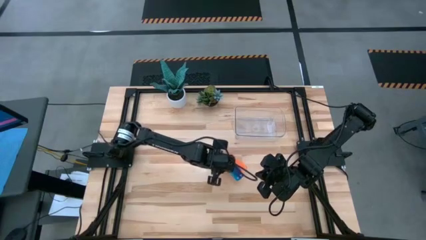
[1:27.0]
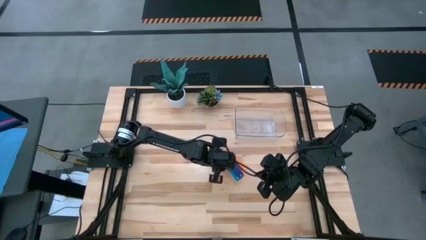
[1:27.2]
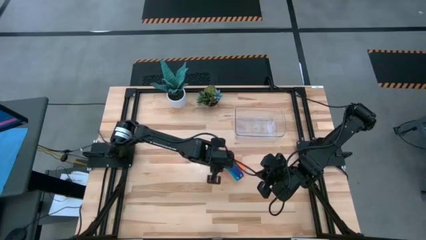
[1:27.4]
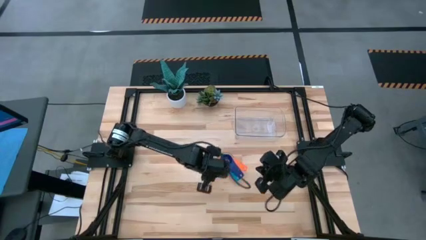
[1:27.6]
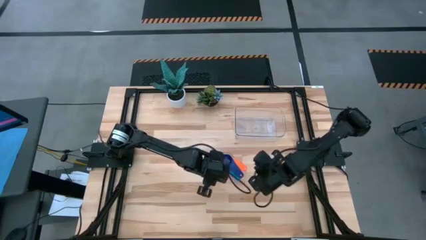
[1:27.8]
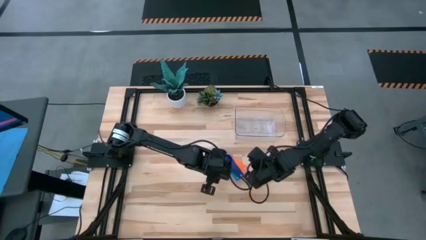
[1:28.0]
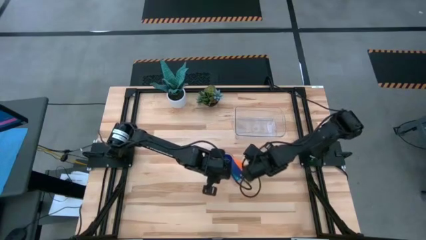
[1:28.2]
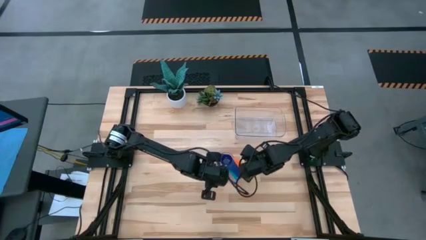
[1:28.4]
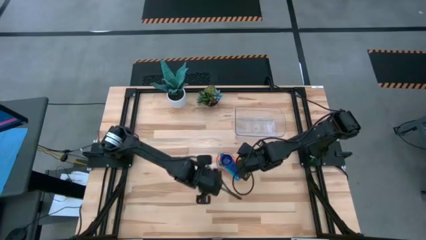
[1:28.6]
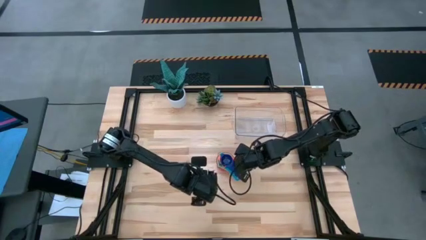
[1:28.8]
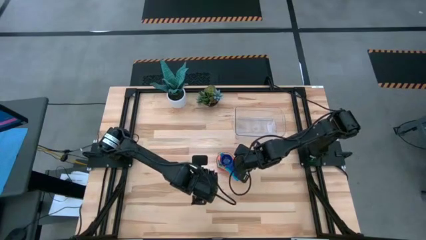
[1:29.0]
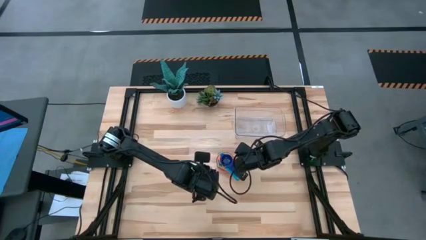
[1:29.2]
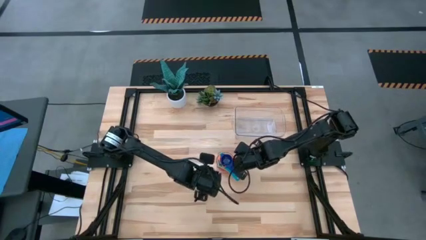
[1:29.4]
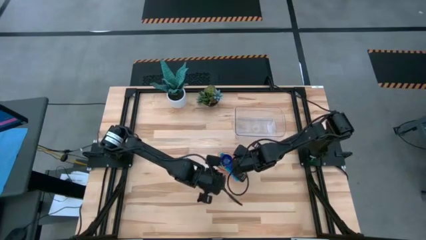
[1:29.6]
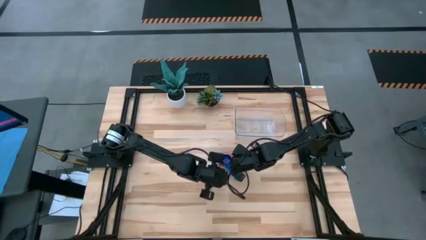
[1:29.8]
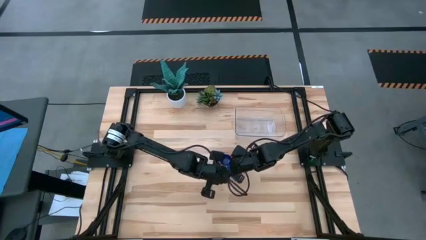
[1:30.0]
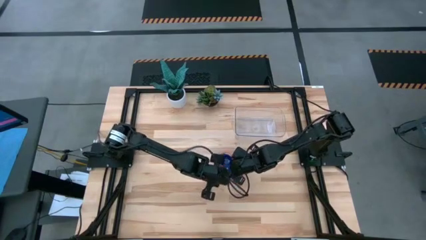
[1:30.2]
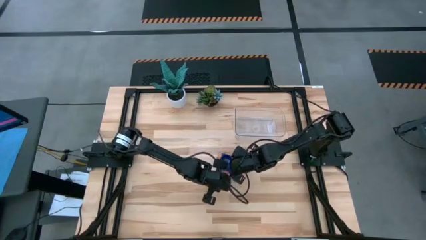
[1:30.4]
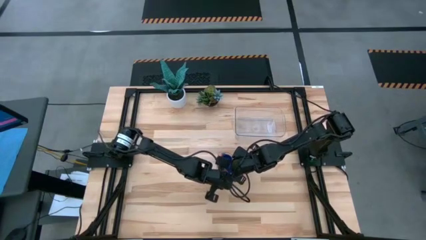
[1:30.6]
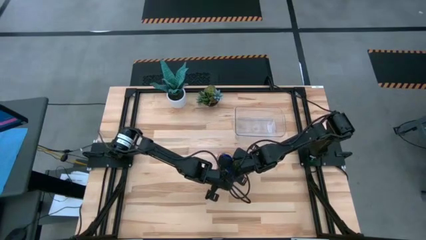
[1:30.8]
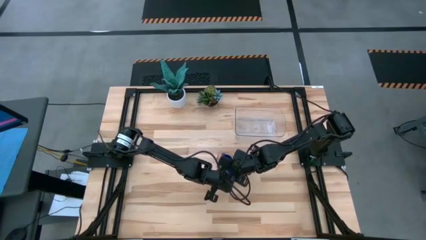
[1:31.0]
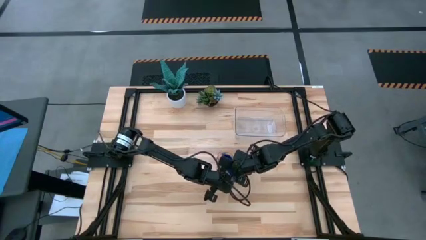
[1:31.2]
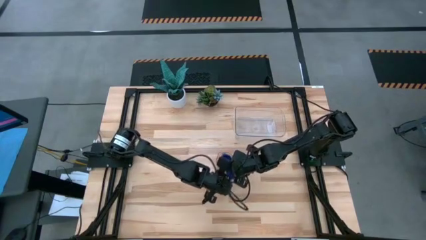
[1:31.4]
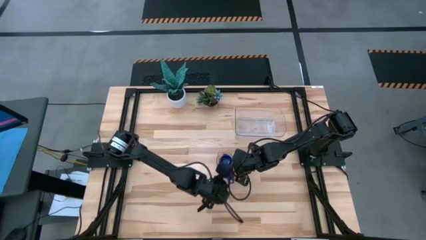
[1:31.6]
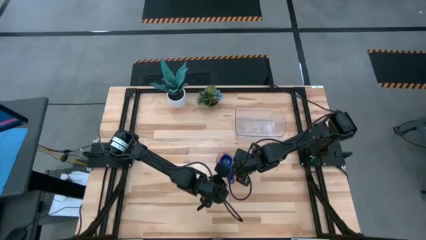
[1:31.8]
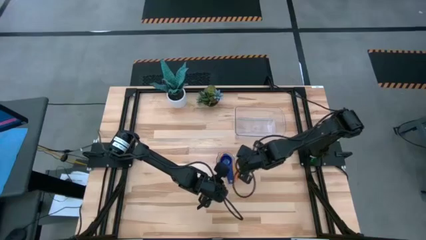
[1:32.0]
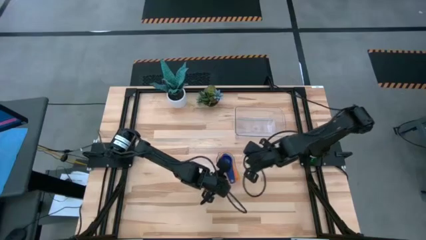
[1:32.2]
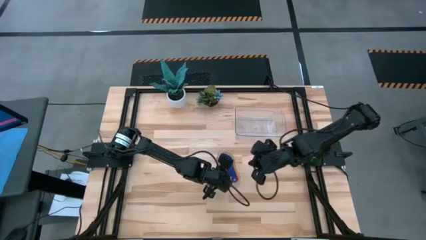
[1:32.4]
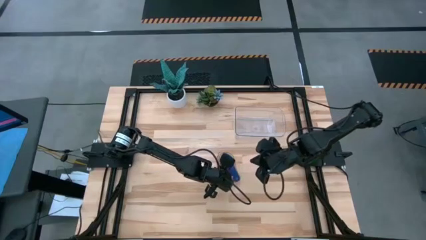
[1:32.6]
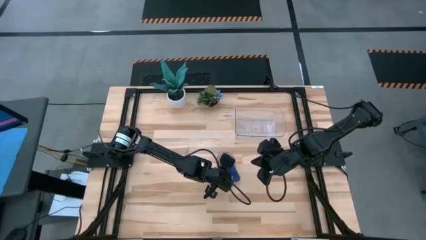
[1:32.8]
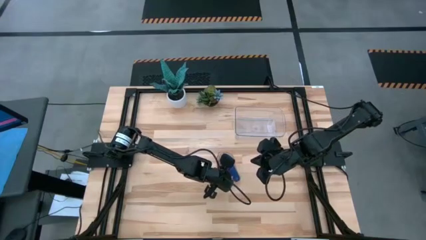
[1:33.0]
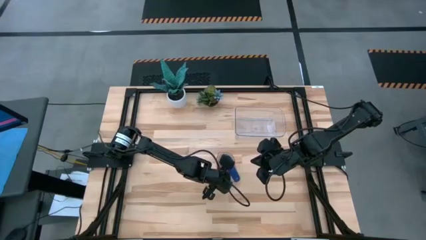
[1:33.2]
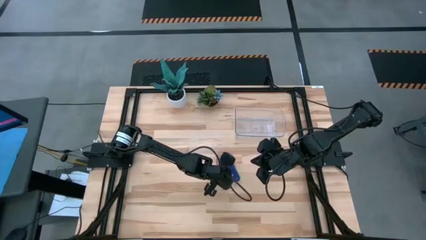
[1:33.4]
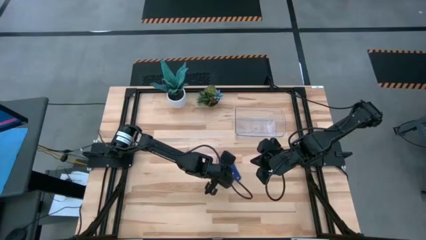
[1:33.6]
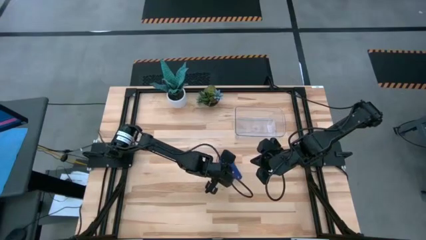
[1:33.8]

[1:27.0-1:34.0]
Task: Nest measuring cups in basket
Adjust the stacked measuring cups

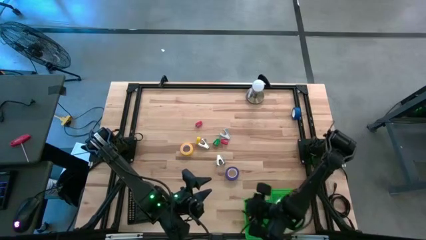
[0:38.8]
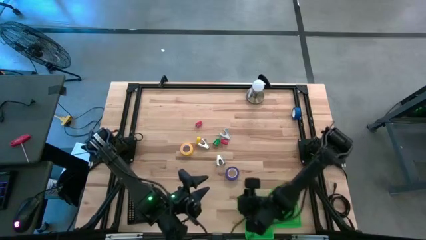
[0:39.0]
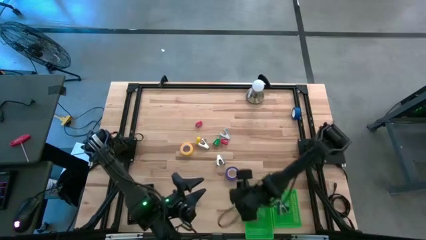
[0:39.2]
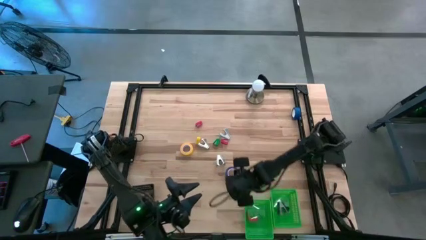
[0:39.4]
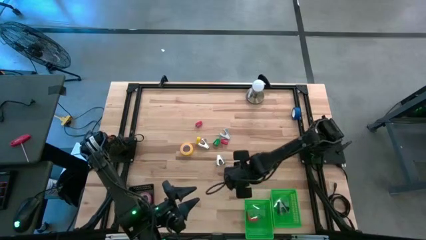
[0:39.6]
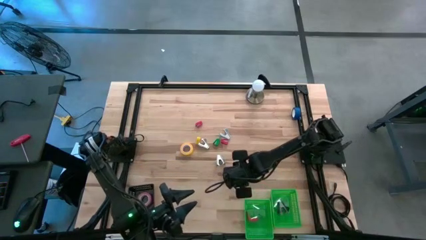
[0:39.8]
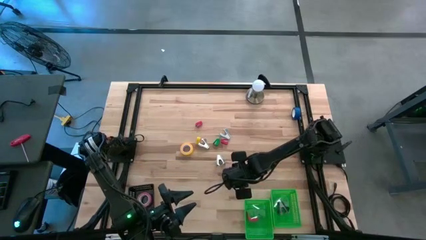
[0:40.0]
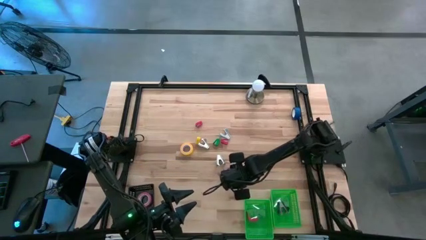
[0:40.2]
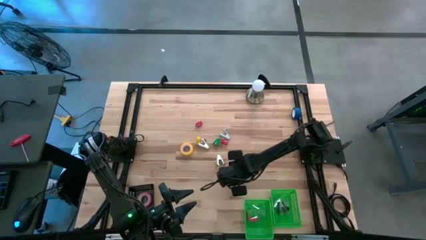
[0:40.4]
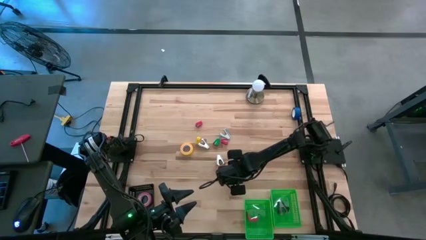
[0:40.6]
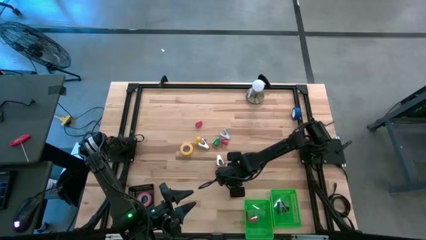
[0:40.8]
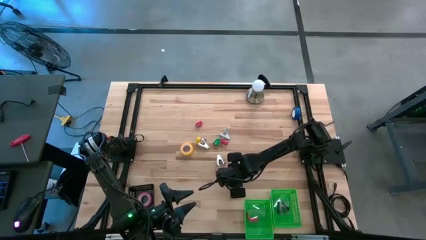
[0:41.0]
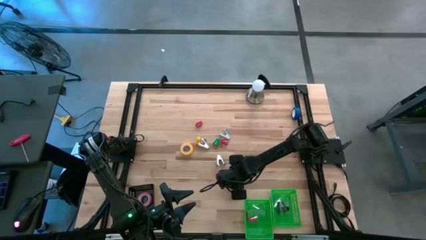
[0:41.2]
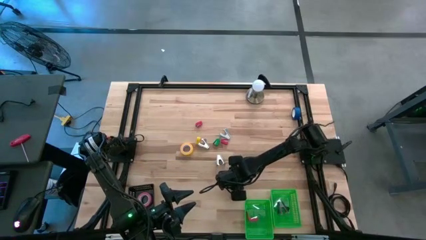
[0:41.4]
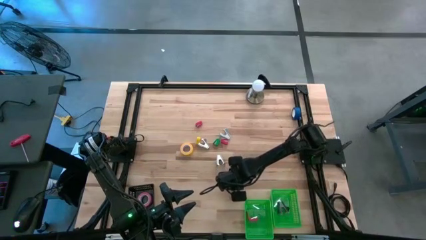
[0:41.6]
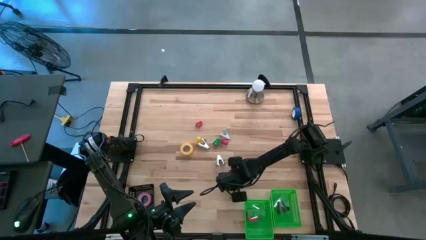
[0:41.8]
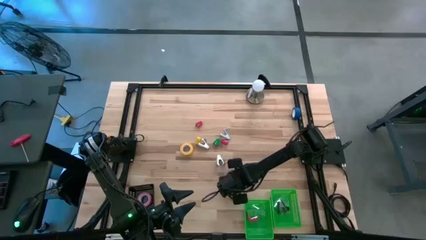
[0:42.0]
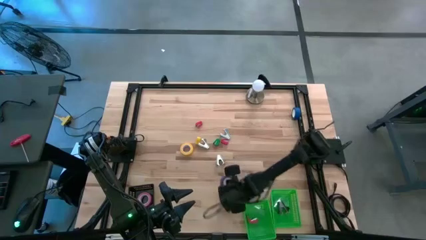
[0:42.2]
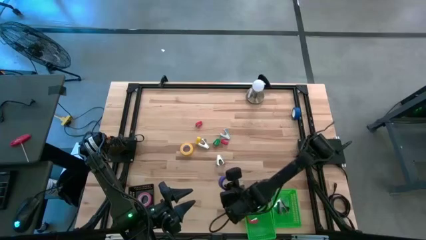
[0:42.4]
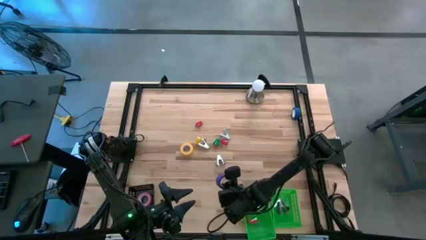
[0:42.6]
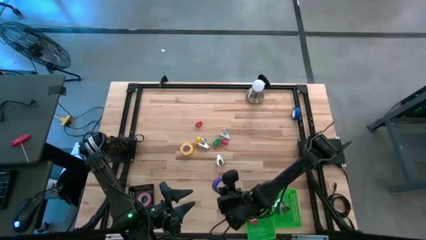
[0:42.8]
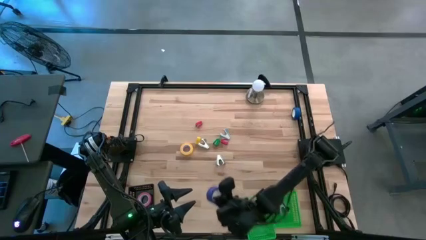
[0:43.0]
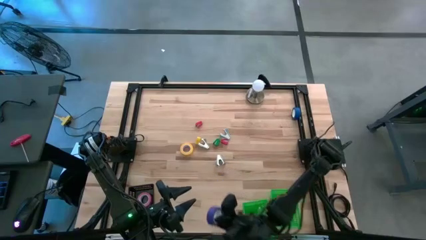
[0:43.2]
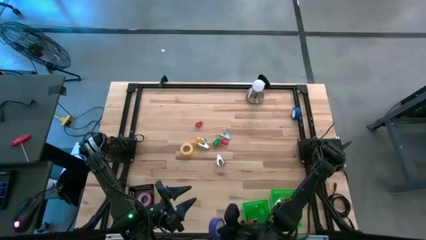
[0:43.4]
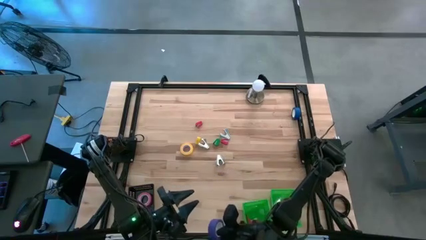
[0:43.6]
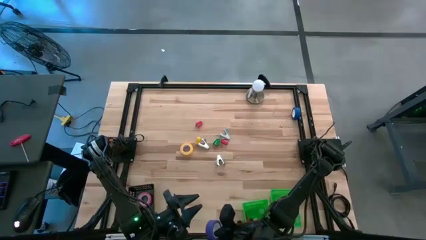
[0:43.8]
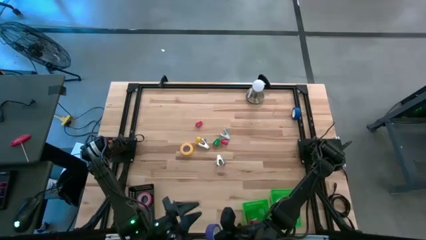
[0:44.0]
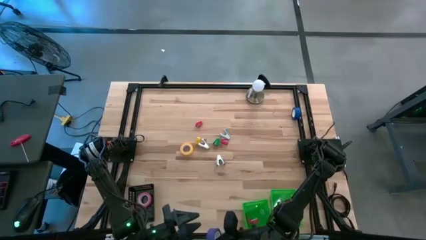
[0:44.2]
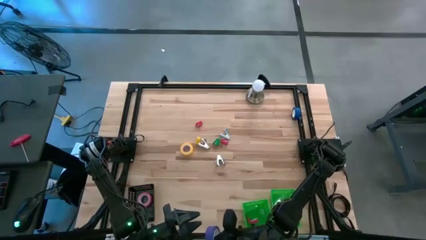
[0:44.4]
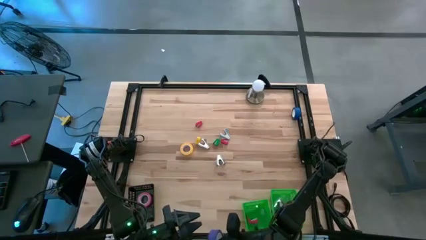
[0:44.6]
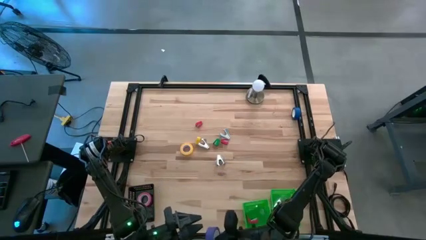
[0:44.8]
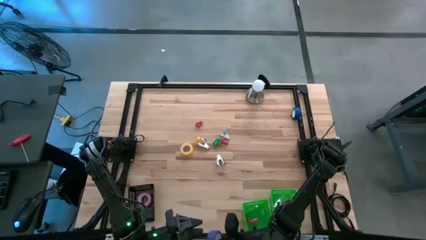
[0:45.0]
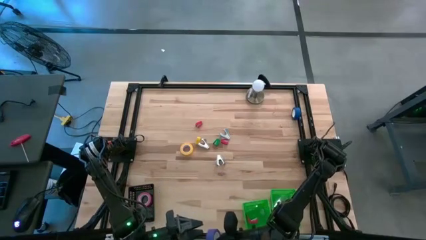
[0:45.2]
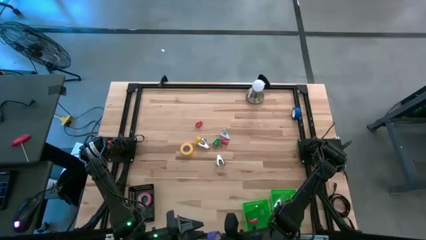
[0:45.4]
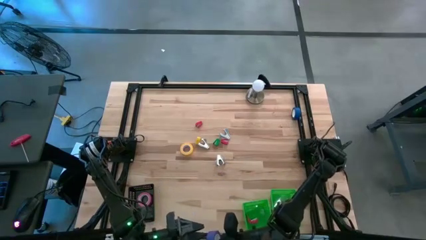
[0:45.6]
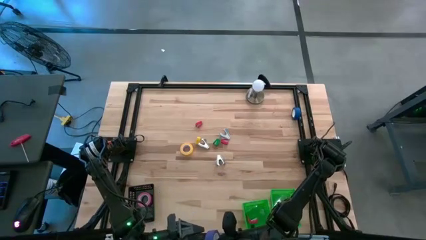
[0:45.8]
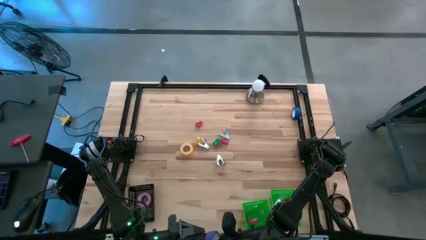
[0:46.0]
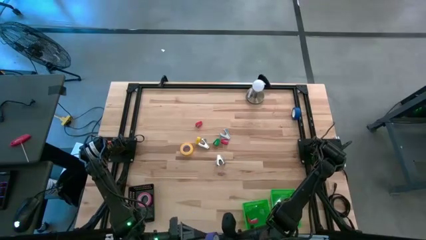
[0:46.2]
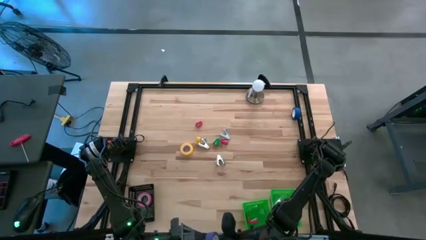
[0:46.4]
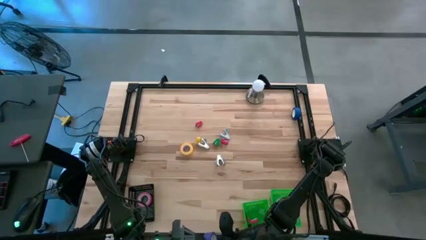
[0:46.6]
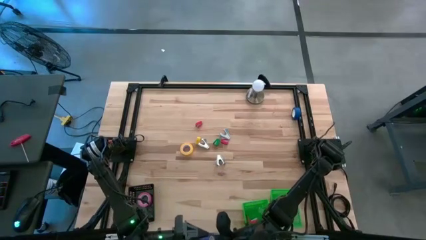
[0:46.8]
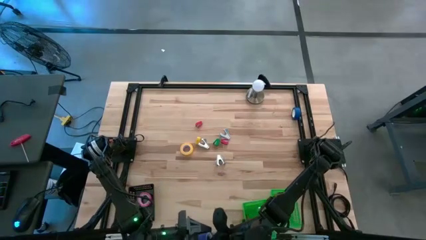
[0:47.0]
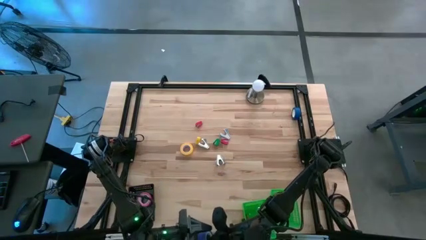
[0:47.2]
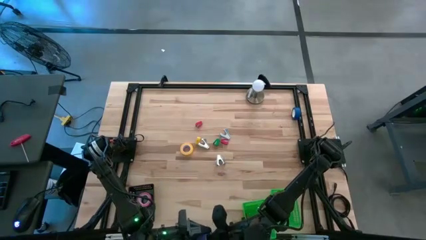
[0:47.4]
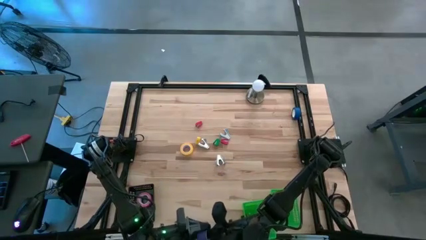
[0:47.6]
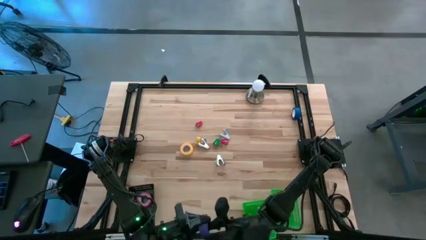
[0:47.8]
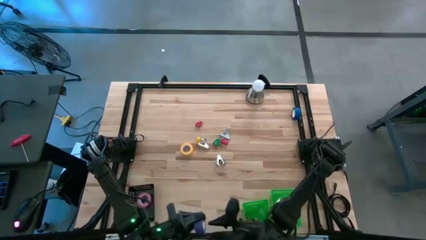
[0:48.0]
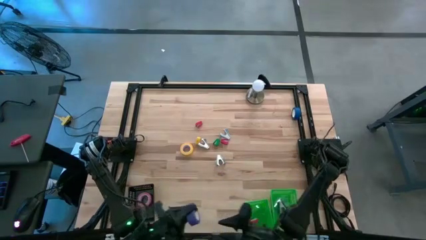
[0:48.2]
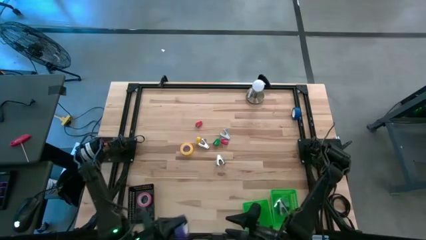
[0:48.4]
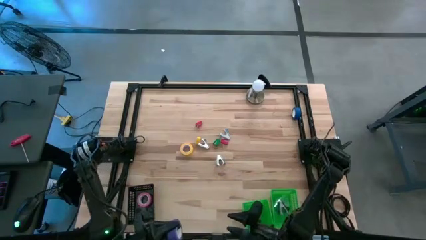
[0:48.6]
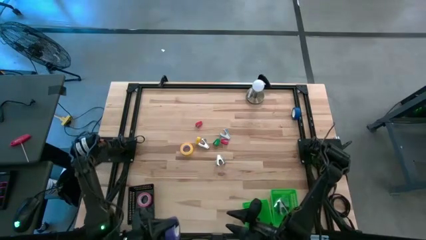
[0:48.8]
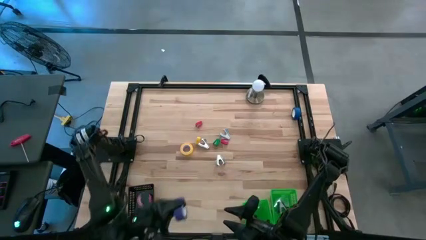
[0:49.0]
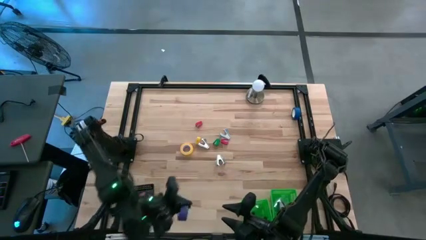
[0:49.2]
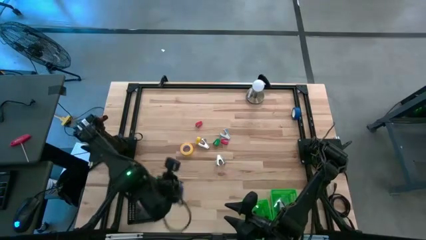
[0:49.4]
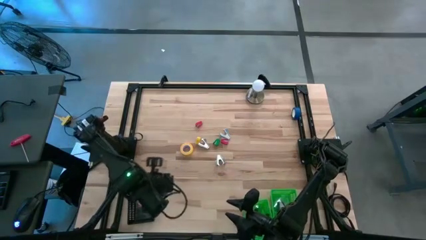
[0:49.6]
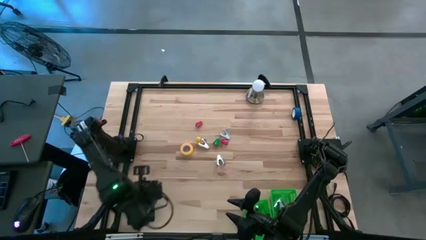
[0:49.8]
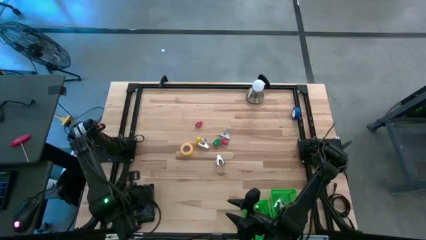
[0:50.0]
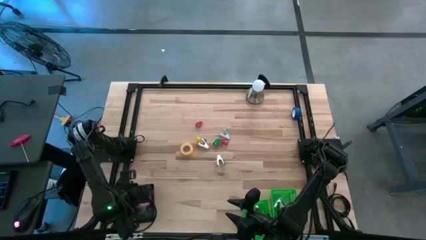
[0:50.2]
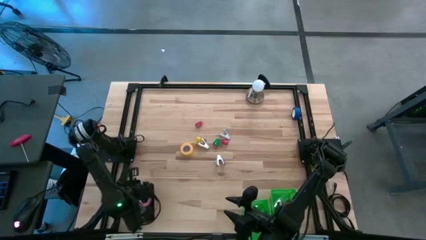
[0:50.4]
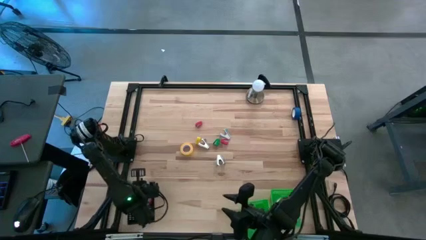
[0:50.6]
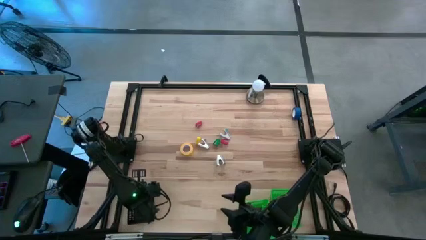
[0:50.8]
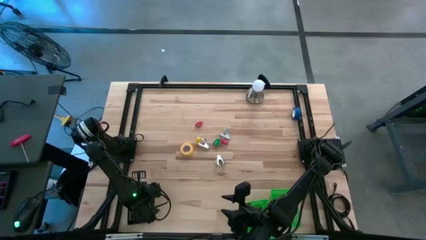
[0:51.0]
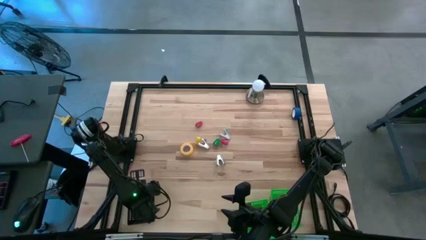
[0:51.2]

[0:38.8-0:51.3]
Task: Pick and place Stapler, Stapler remover, tape
Put the top blue tape into the pink tape
